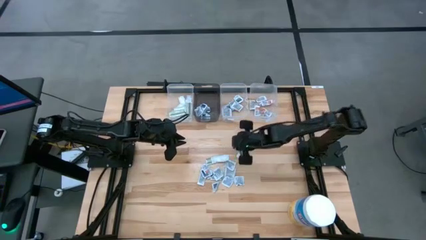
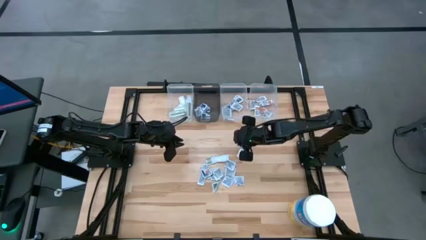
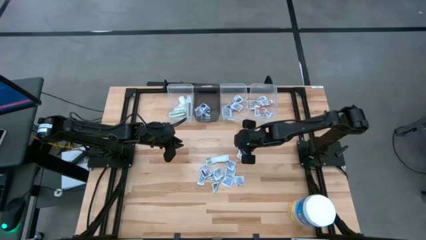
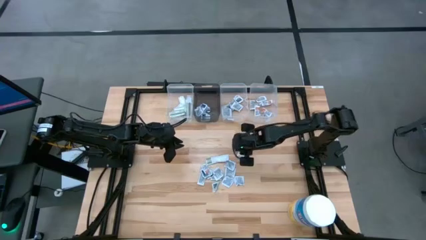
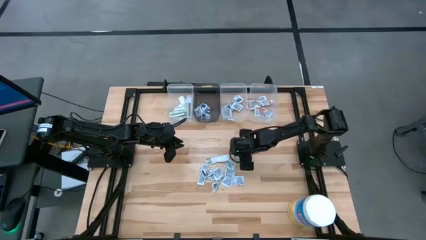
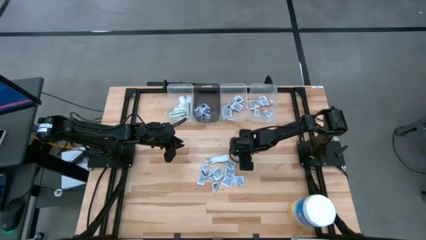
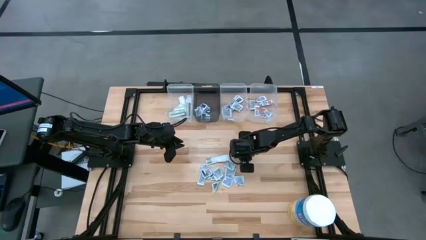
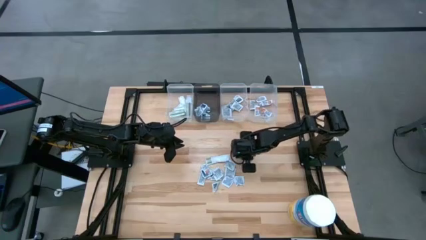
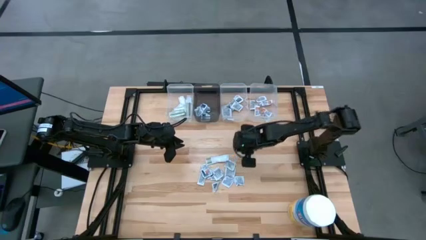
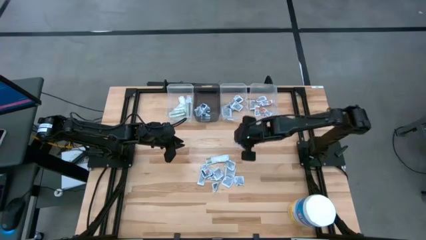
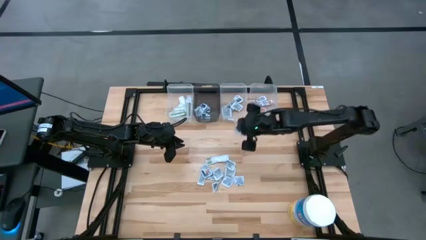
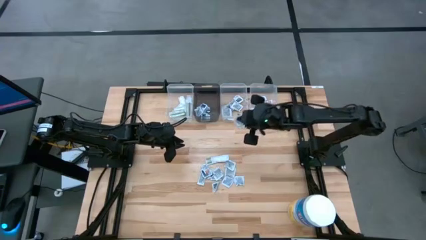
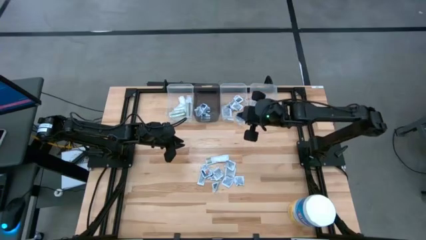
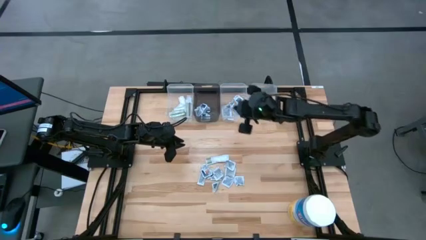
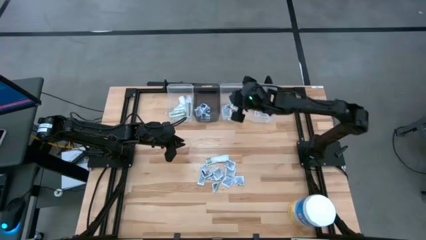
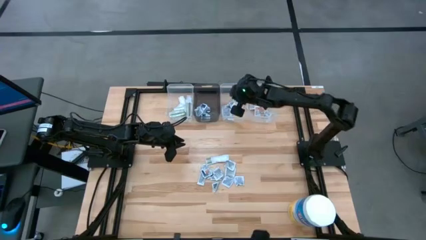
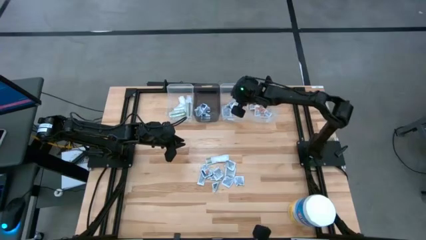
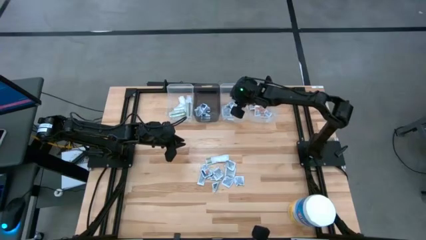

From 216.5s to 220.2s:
Task: Pick & Place First Aid Supplies
Put the towelette pack into the middle transparent bin

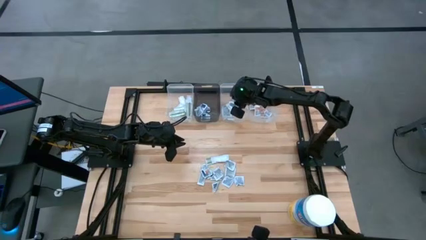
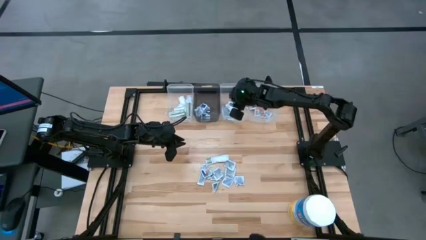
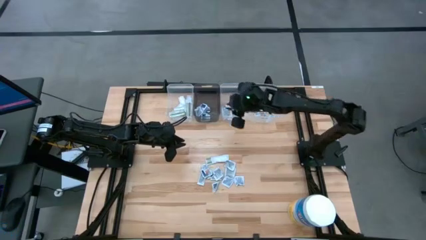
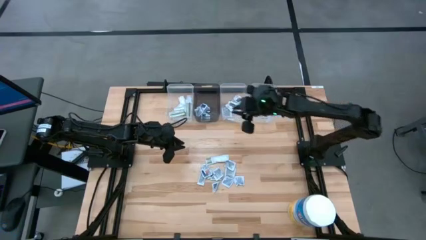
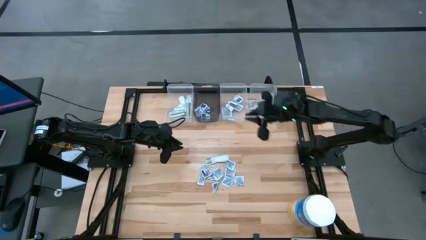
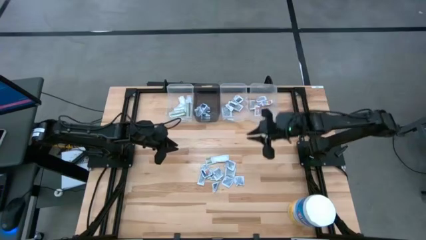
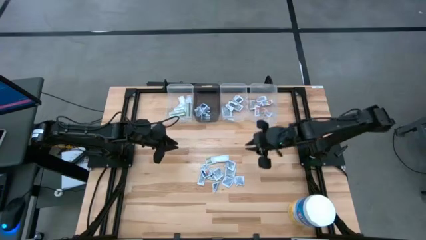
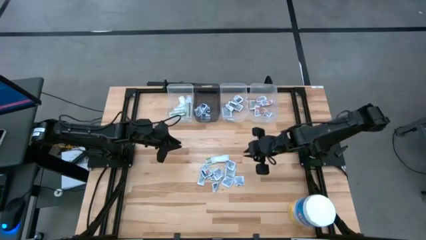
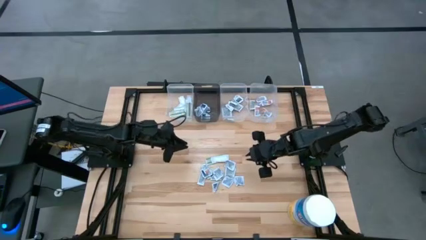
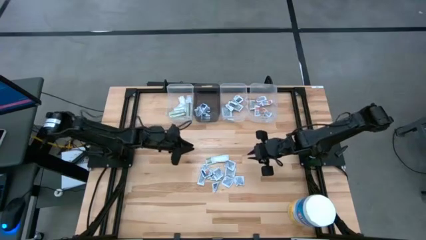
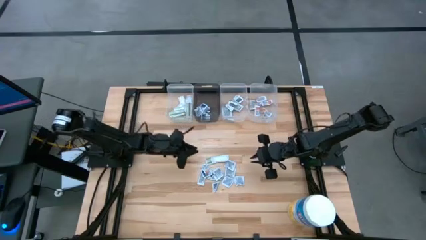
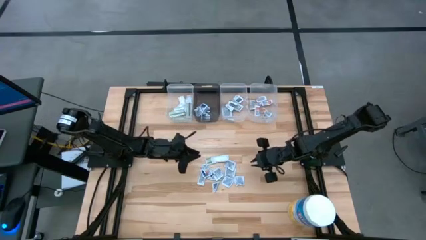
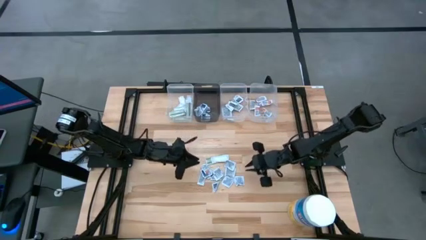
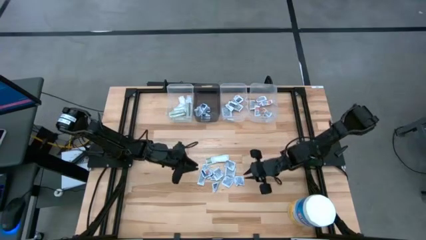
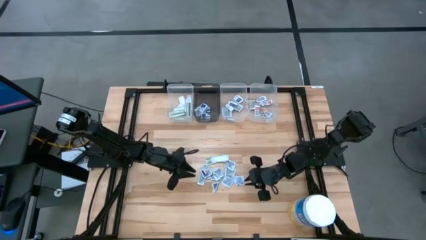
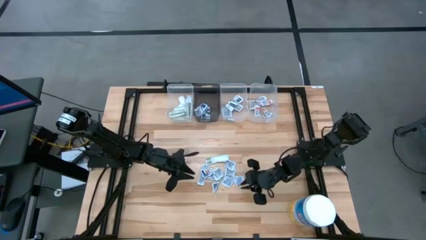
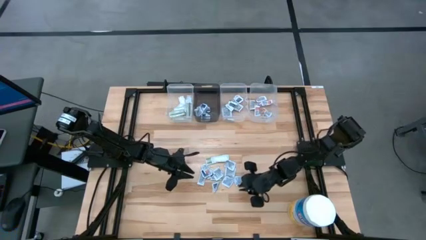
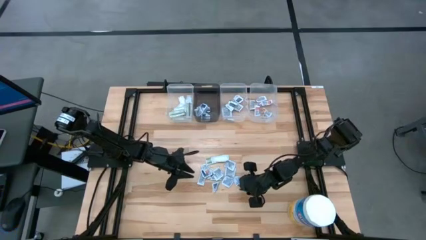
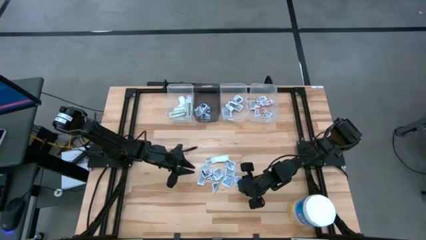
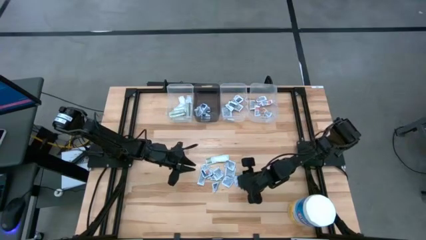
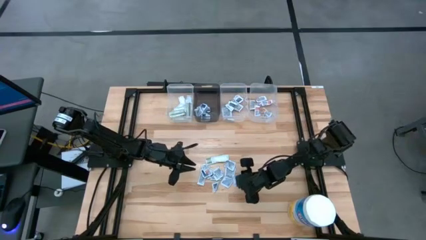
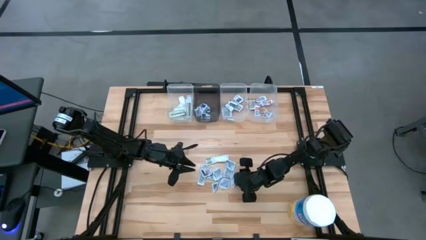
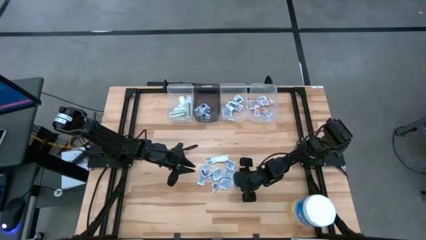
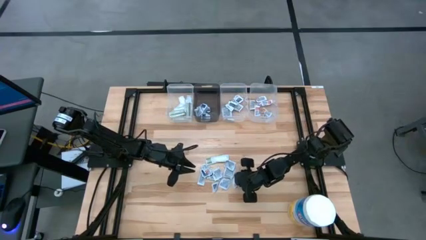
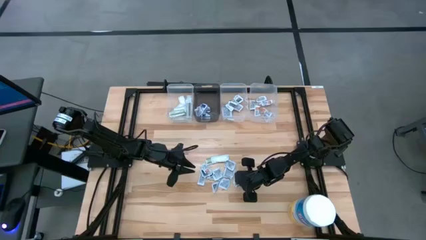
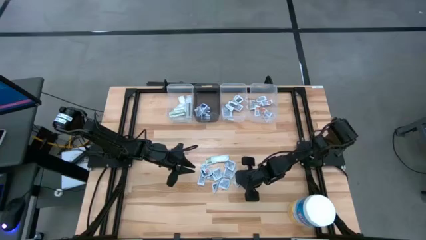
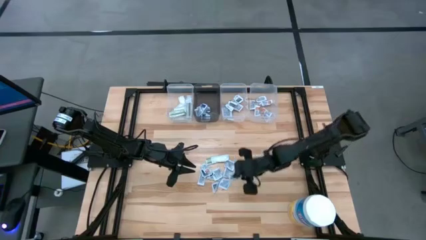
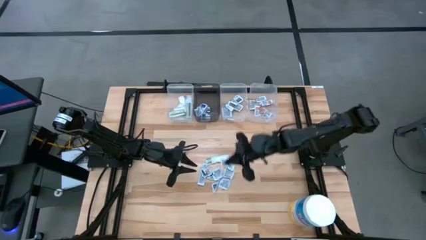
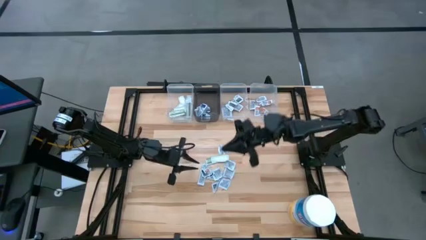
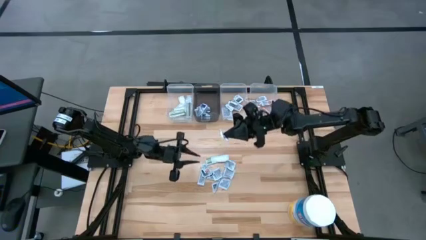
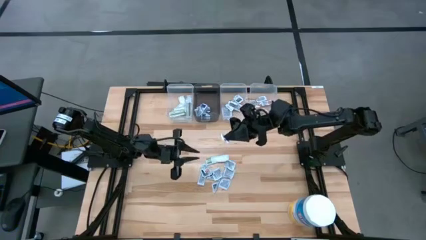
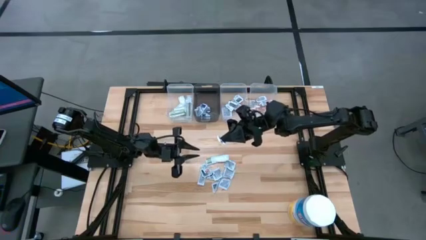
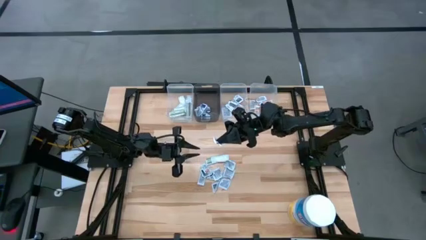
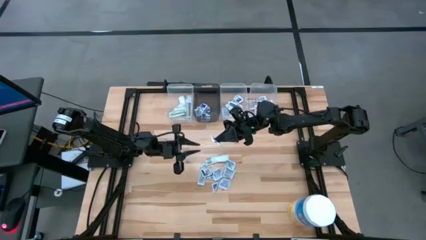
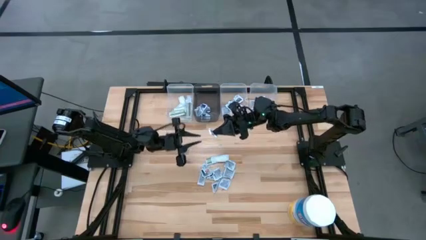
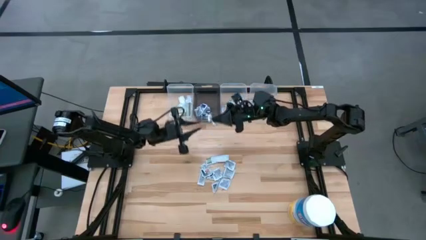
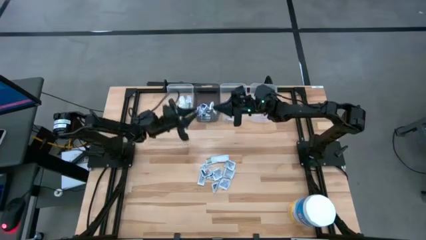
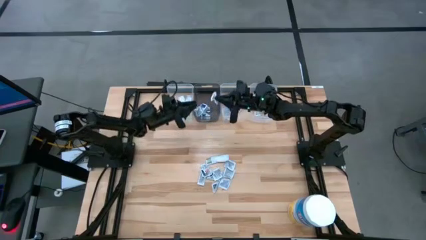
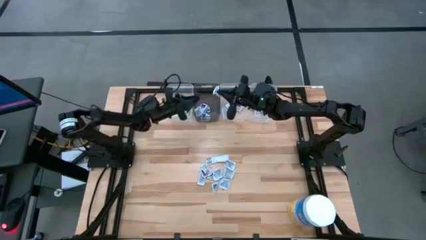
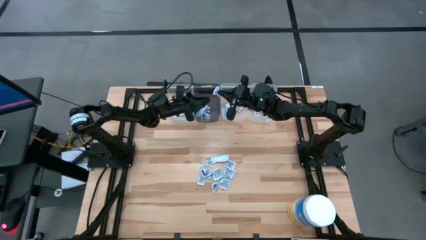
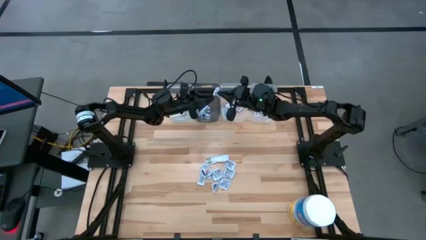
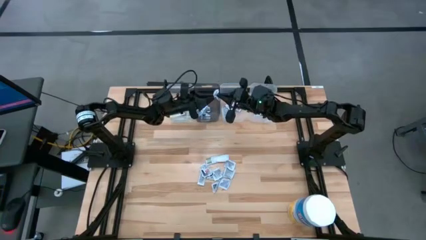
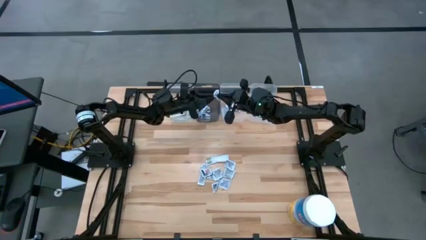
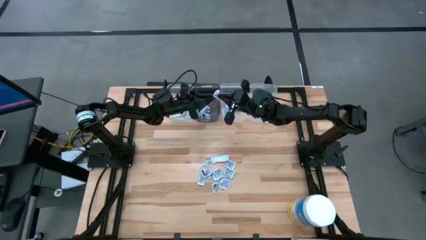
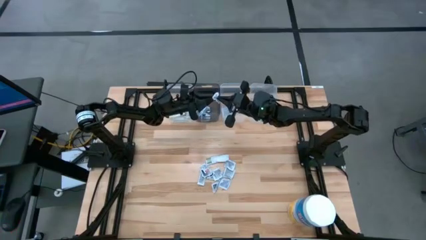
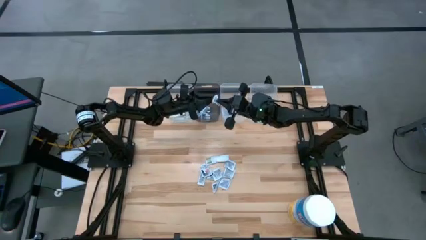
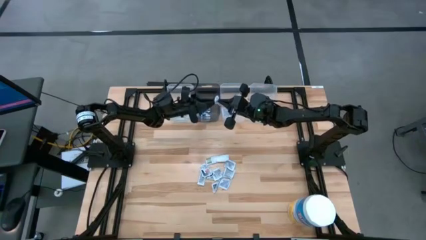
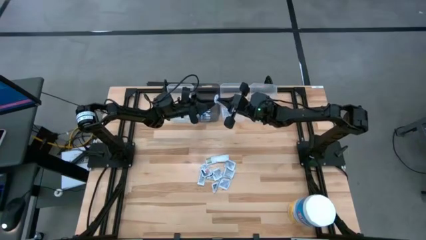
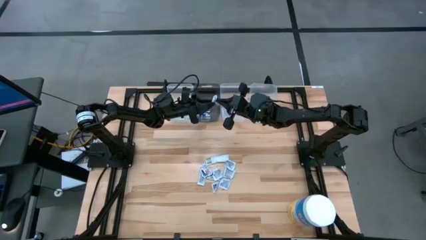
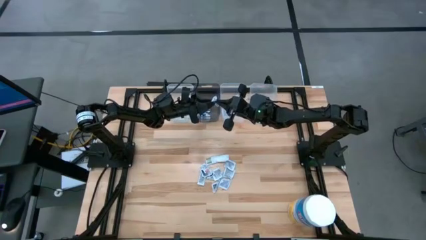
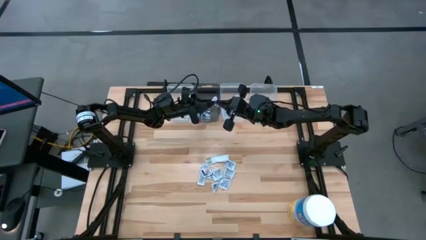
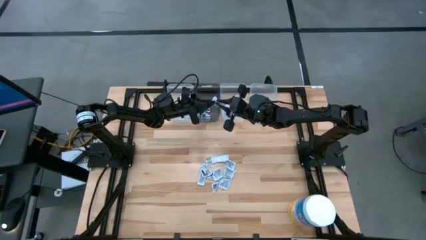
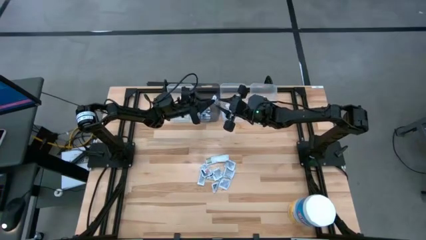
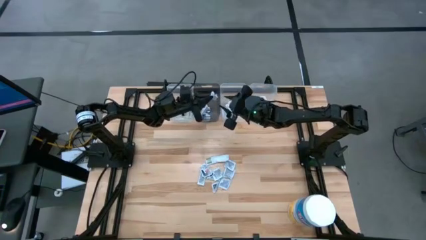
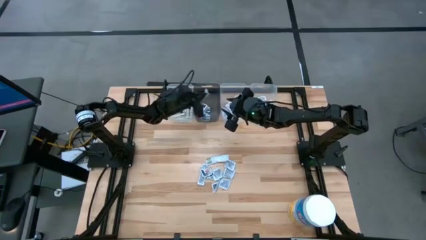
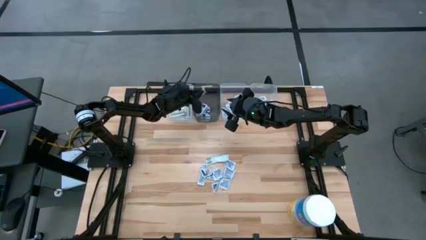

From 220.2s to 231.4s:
Put the alcohol pad into the transparent gray bin

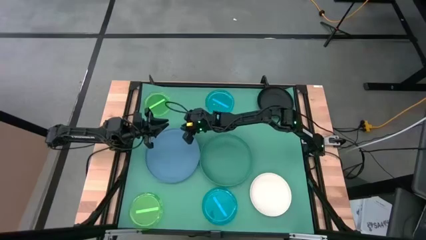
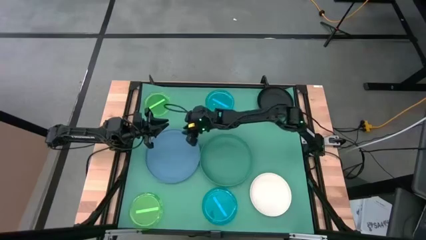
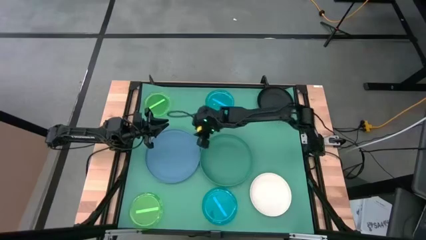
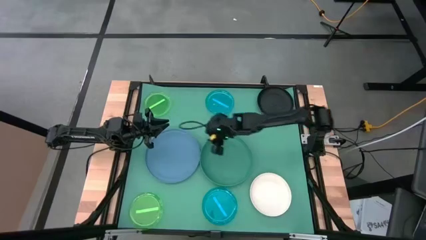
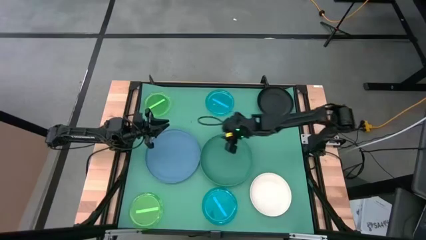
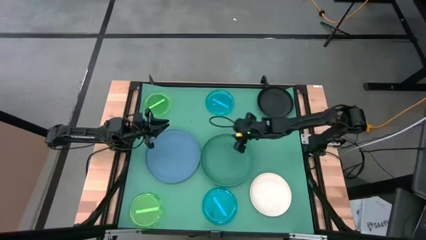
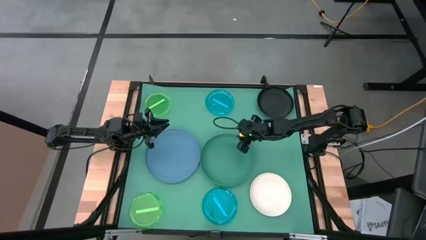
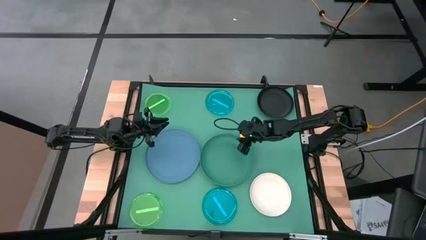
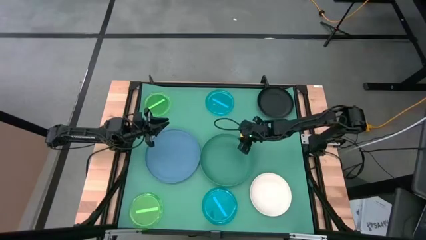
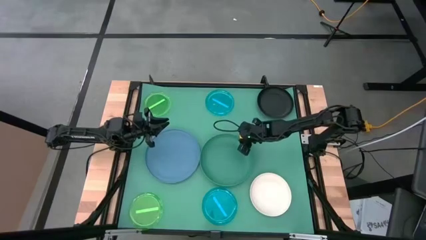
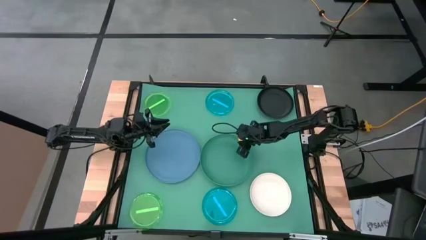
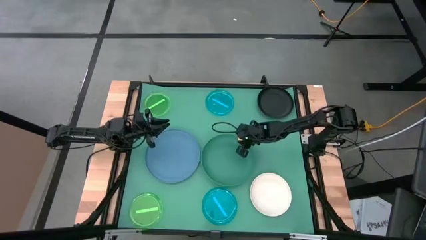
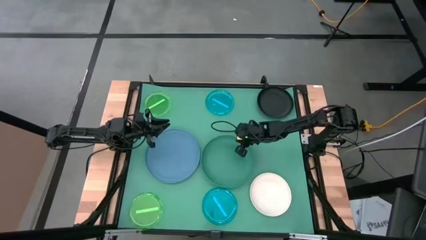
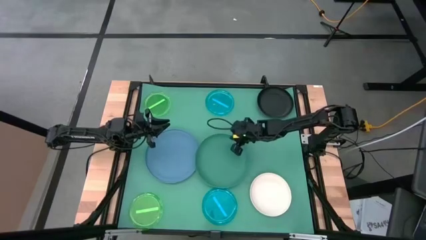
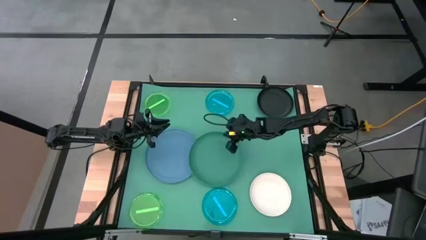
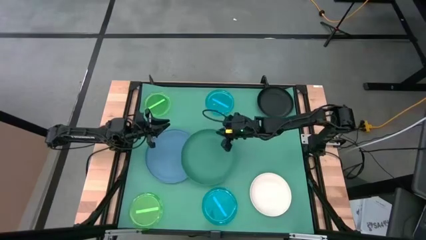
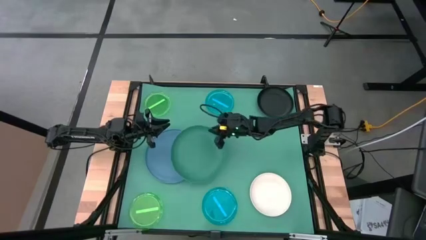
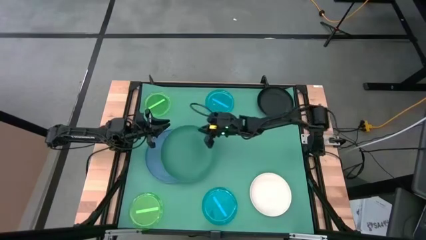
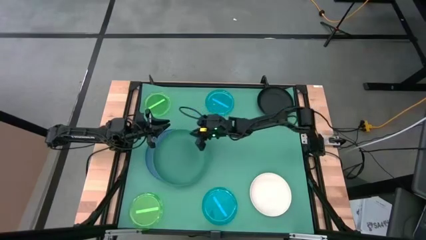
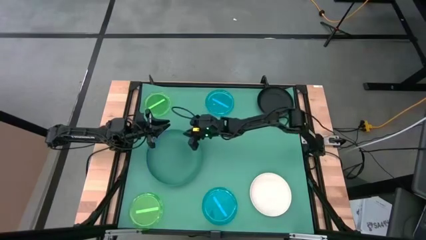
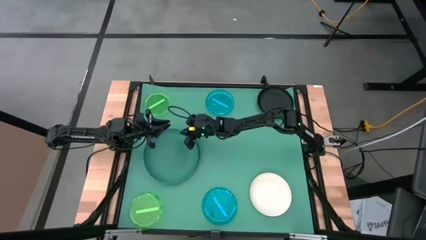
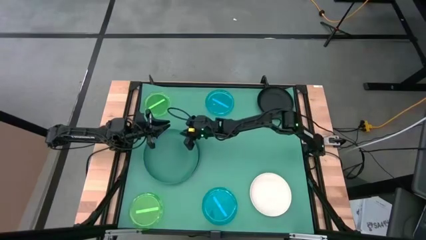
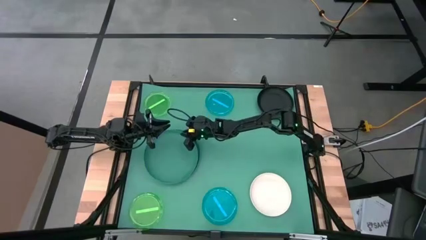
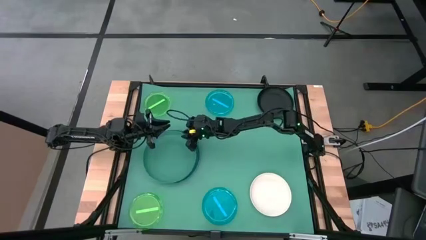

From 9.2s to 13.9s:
Task: Stack plastic plates
Stack the green plate on top of the the light blue plate
